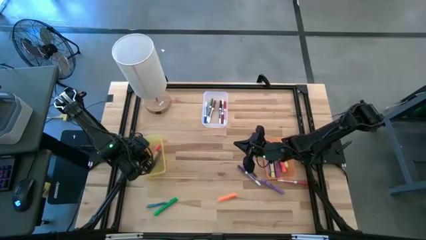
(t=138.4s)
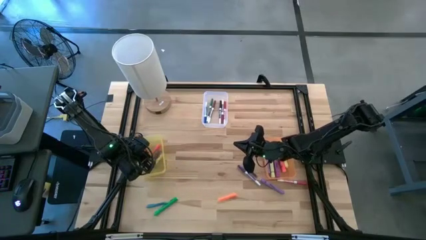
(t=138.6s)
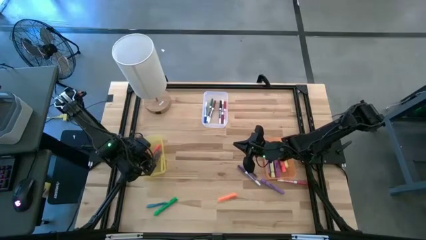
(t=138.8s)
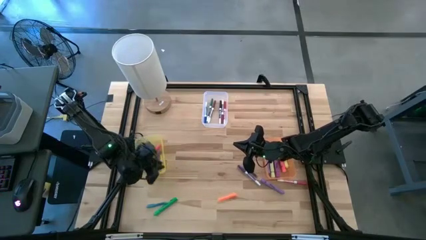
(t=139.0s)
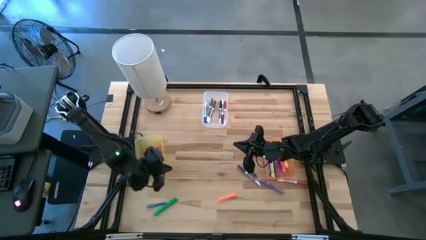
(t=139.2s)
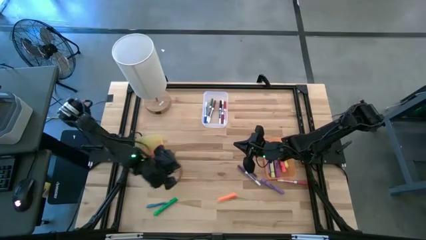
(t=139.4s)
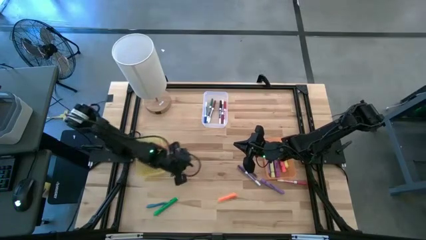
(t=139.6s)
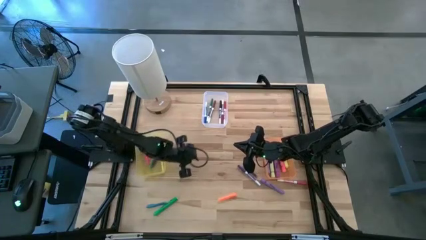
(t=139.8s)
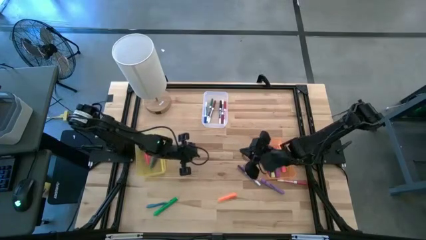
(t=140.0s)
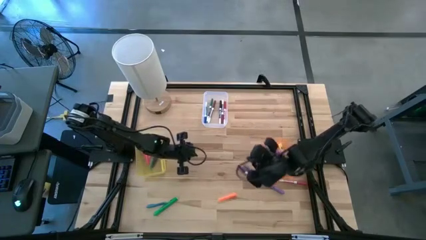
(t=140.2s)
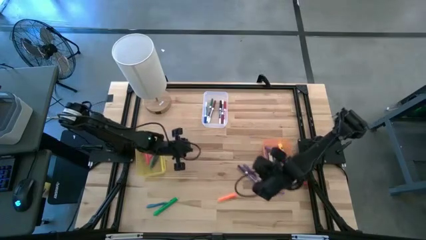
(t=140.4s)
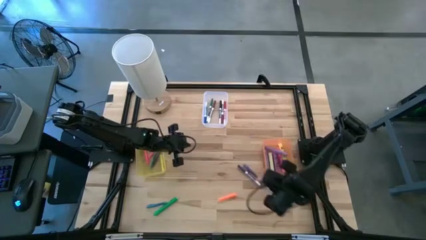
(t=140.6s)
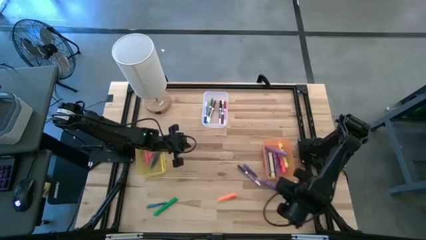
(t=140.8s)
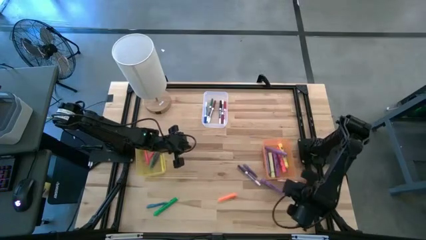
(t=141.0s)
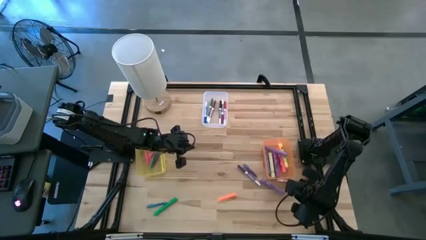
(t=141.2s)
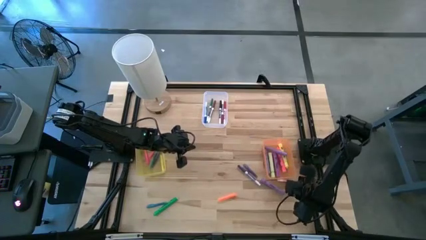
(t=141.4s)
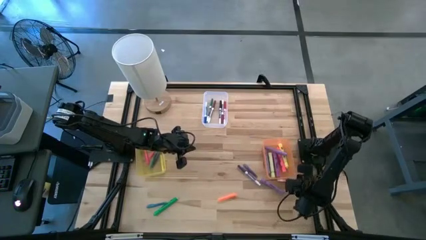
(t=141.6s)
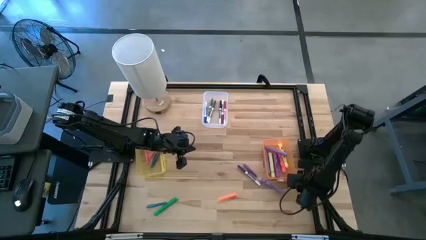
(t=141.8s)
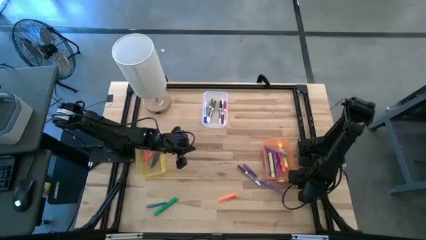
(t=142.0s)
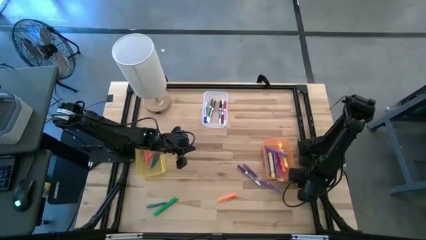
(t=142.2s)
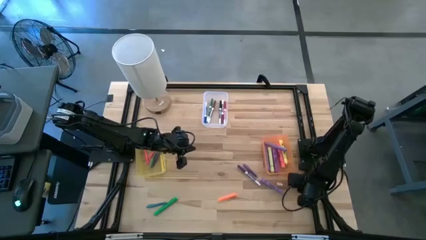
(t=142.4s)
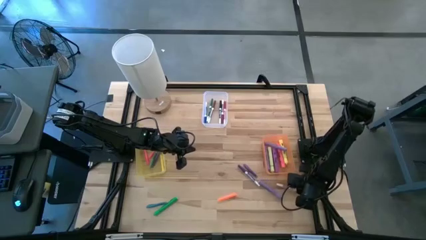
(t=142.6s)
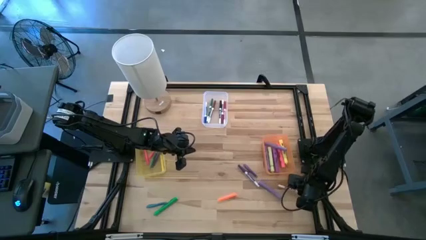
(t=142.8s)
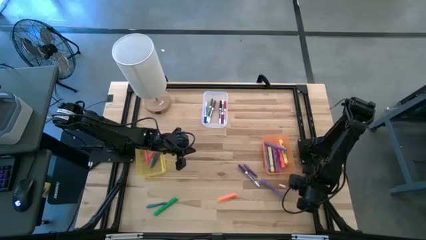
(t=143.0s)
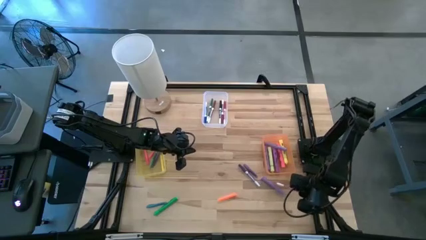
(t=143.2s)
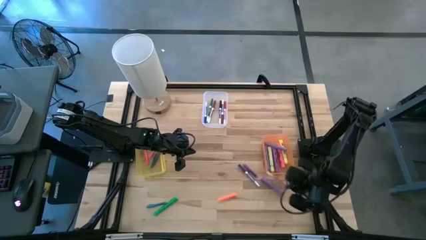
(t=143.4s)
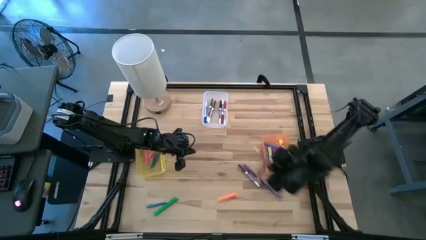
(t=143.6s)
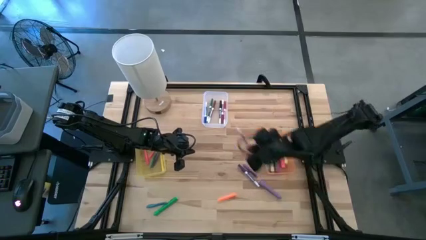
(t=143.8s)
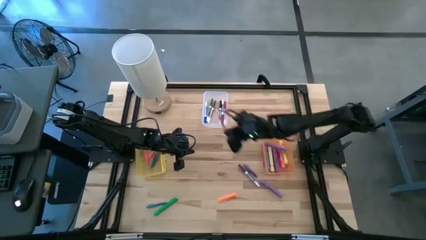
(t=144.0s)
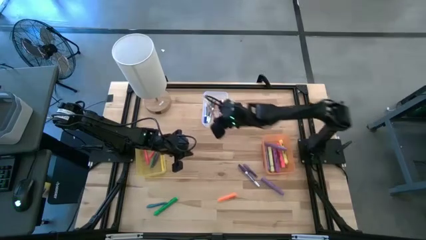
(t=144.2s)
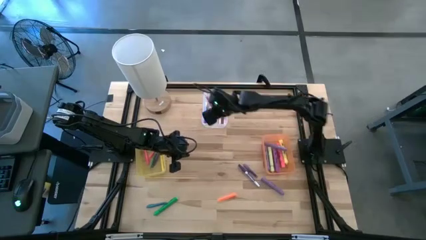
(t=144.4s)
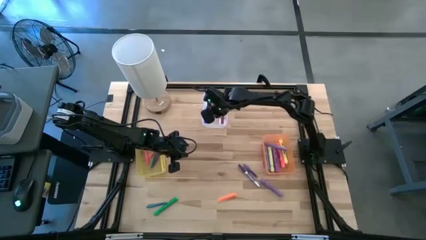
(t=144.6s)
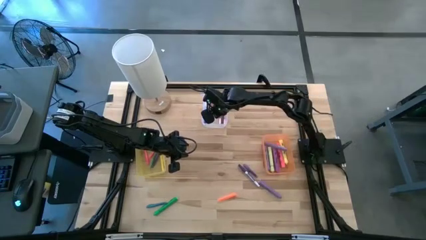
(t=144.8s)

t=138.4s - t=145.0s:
Task: Pick & Place Markers
Put the pink marker pen into the transparent bin

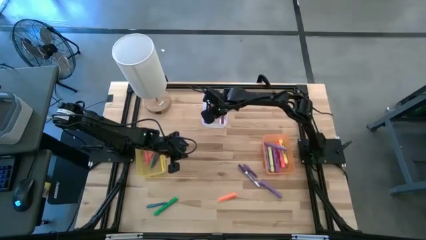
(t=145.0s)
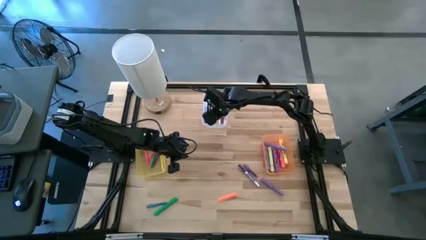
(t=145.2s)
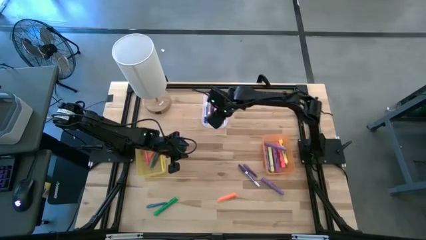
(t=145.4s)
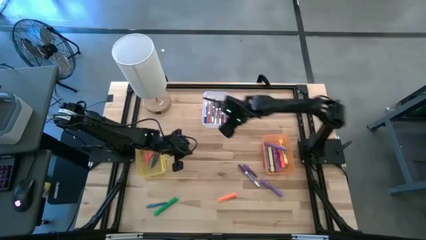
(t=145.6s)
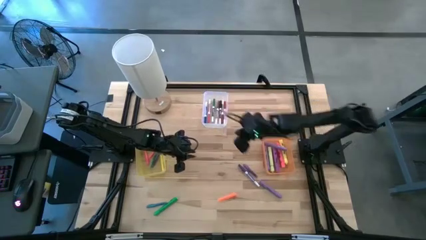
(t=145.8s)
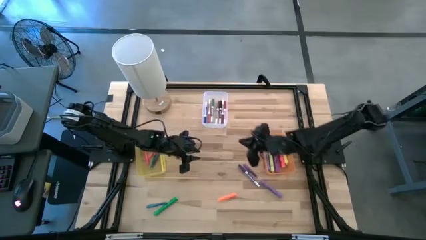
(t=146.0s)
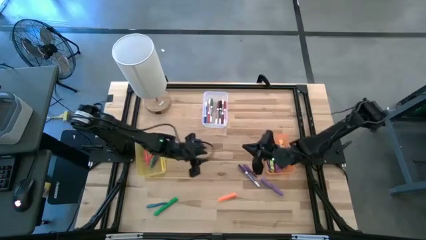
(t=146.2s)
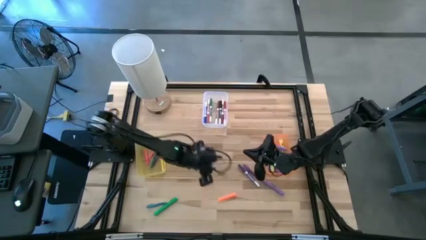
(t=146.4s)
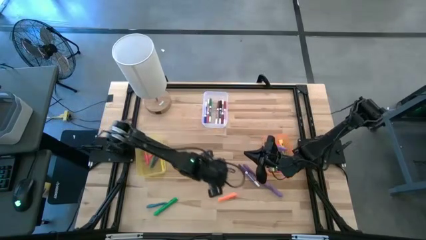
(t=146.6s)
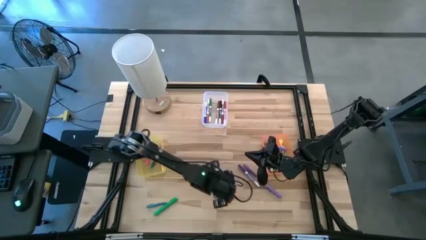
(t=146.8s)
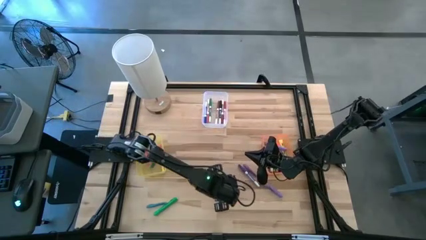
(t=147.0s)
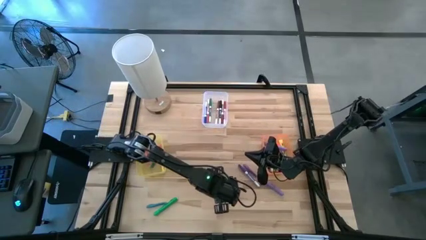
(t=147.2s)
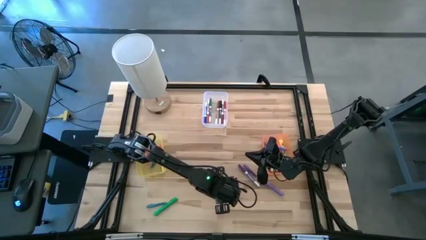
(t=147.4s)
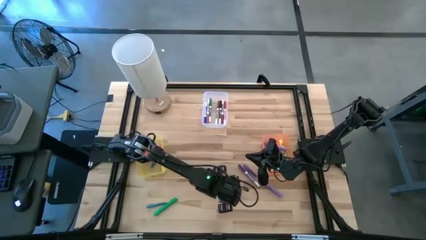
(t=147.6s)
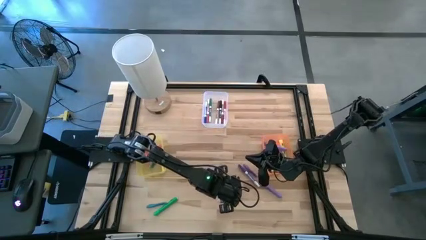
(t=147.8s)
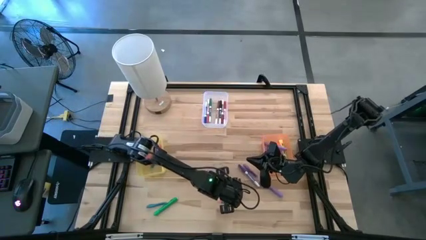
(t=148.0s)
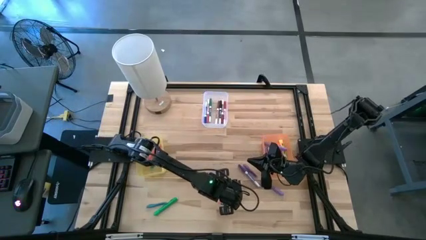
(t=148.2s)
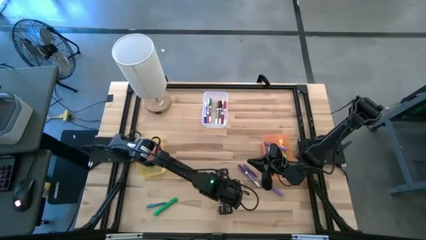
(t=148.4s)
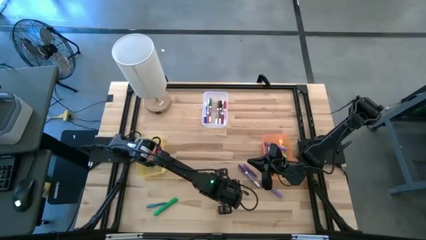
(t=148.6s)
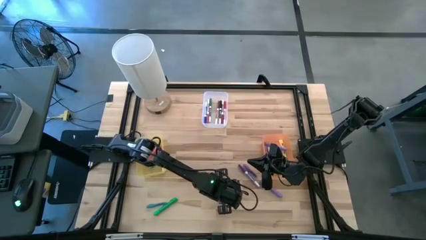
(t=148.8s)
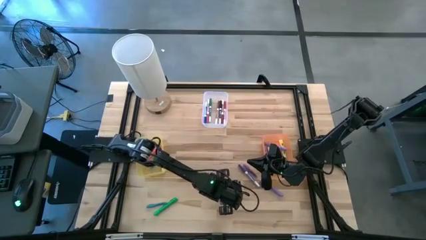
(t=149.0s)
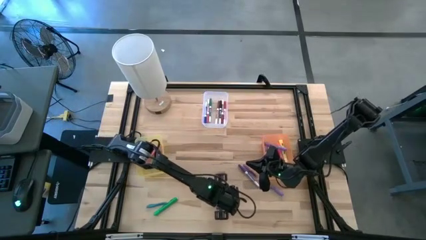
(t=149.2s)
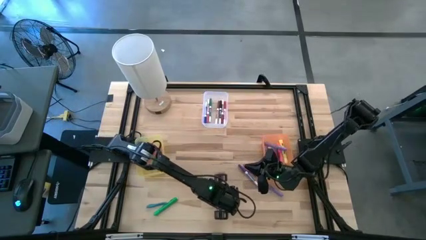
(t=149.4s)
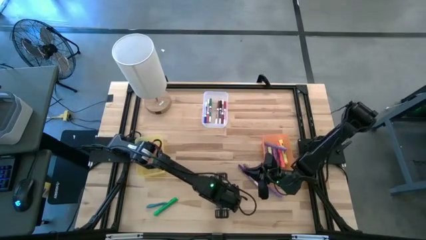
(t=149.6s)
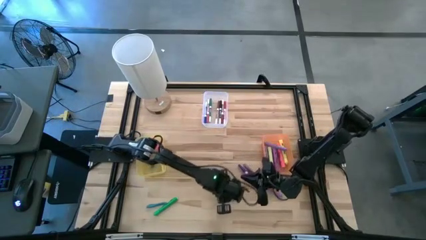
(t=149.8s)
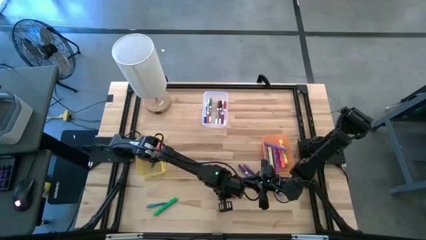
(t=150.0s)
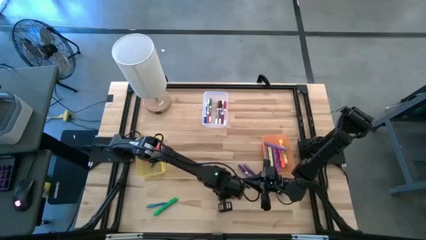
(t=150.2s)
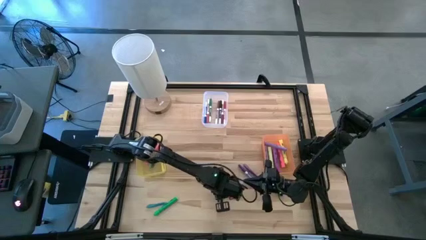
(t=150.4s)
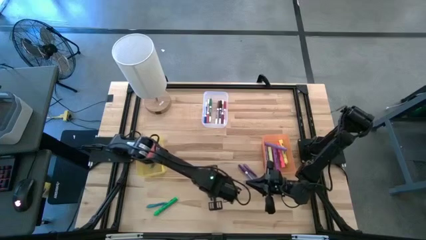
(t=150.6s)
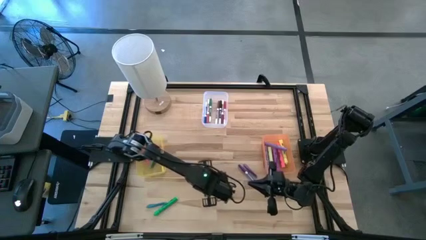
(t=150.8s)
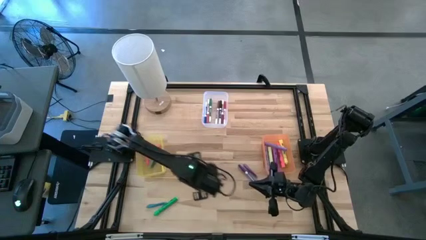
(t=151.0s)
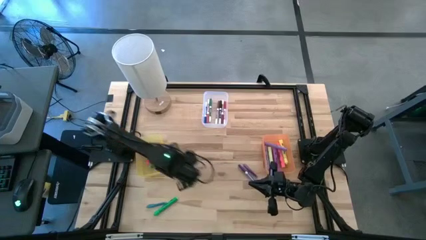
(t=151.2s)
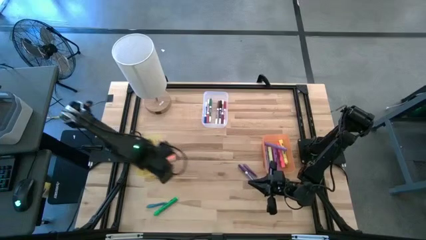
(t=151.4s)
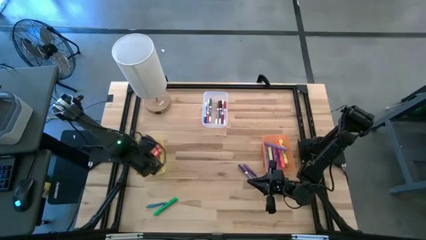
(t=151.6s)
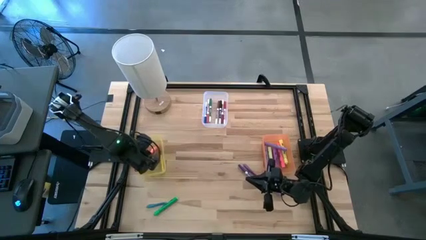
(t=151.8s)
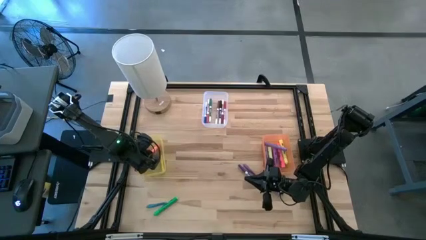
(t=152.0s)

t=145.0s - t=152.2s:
Put the orange pen into the yellow bin

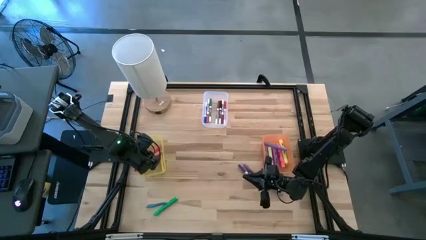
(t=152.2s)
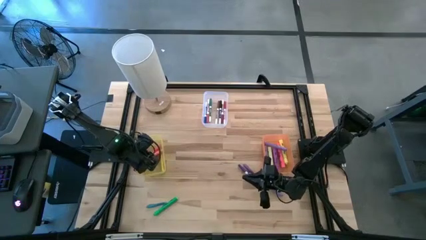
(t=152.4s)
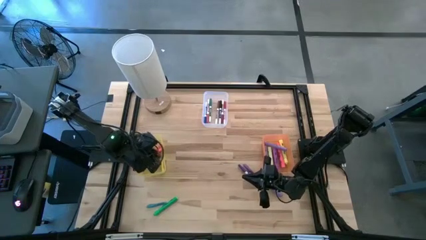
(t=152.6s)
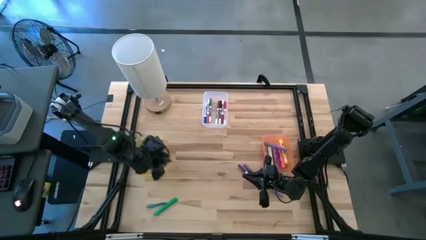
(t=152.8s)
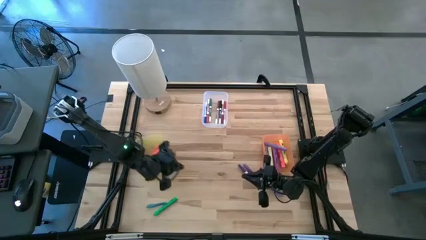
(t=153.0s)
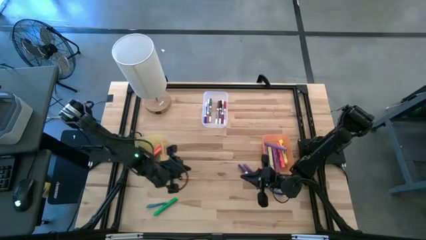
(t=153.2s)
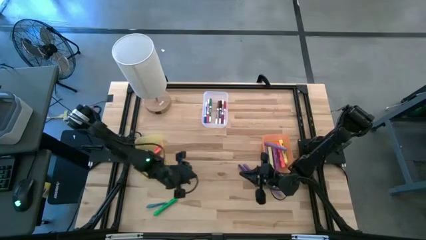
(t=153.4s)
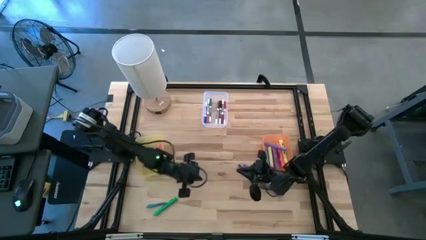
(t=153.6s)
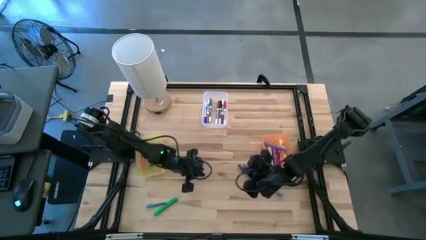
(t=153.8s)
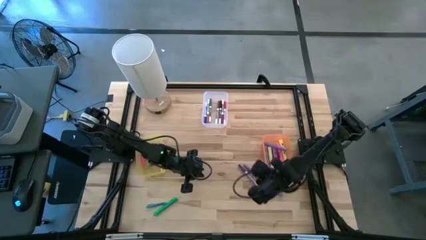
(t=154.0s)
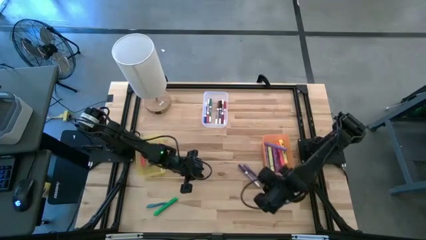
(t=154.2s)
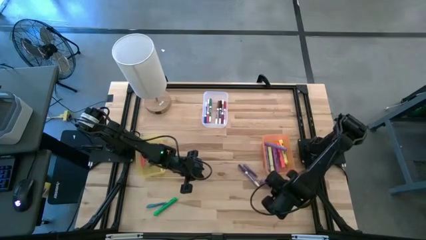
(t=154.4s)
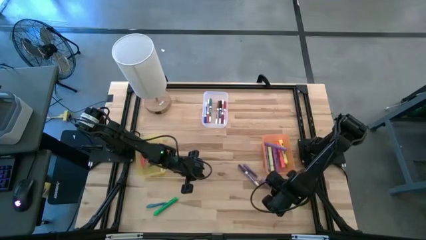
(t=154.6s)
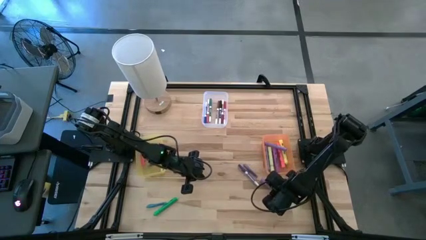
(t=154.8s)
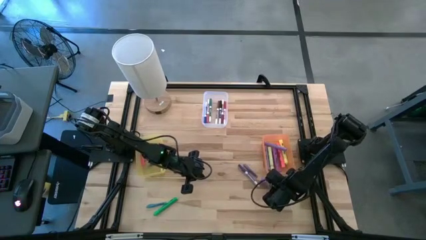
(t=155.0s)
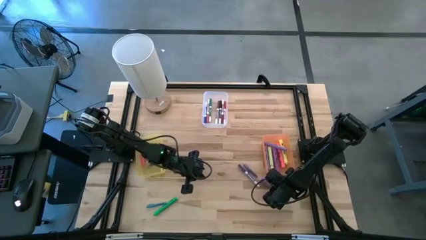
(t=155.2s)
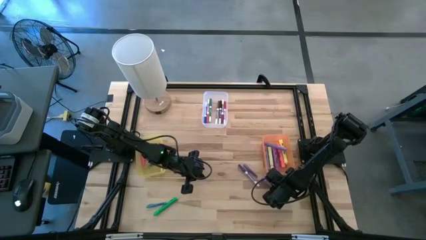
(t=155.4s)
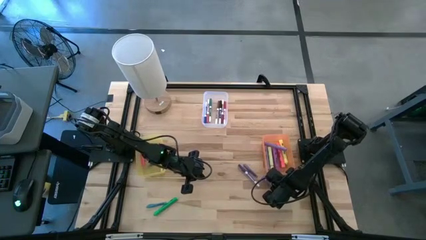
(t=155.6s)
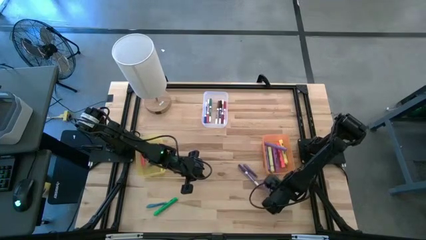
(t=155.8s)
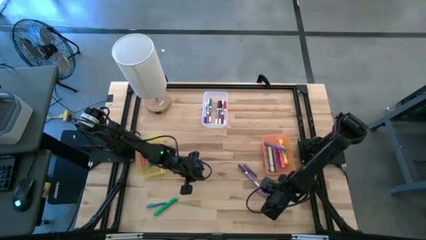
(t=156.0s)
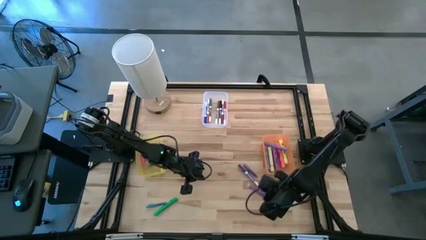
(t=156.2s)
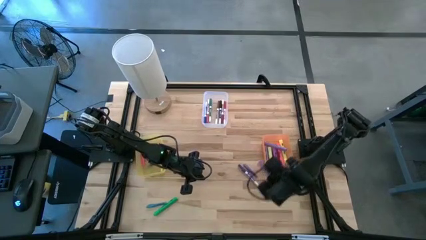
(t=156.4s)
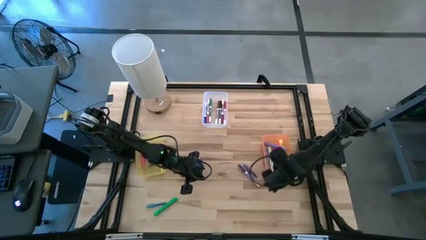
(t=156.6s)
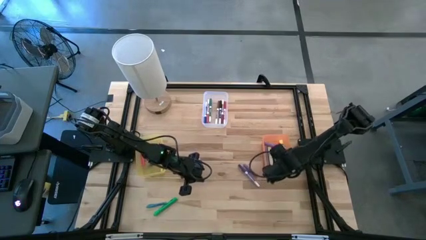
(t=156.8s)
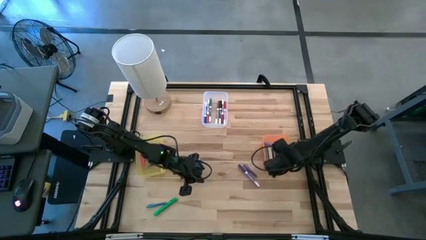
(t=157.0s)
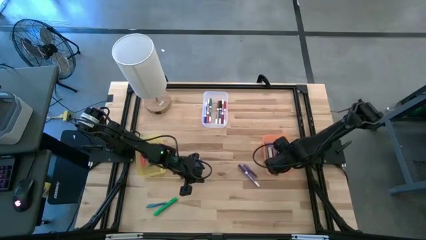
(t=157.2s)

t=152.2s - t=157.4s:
Put the purple highlighter pen into the orange bin
